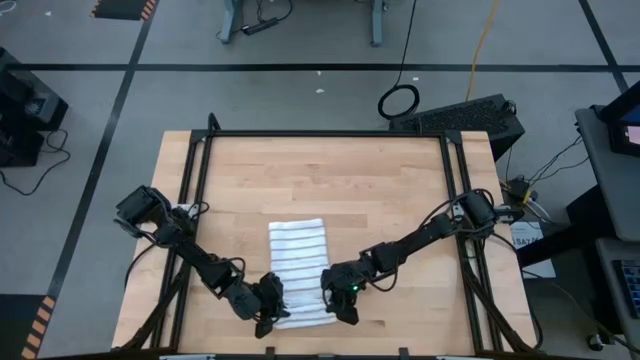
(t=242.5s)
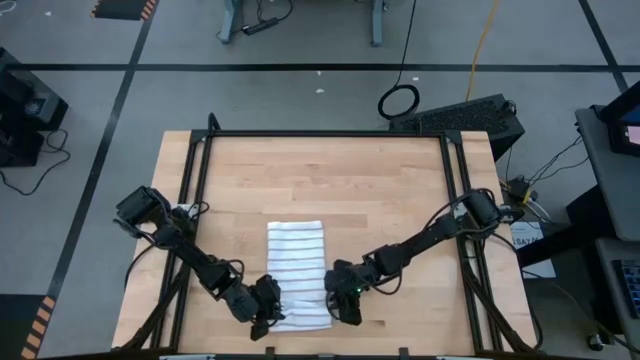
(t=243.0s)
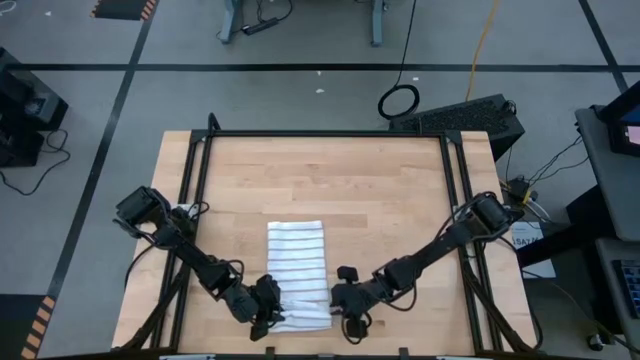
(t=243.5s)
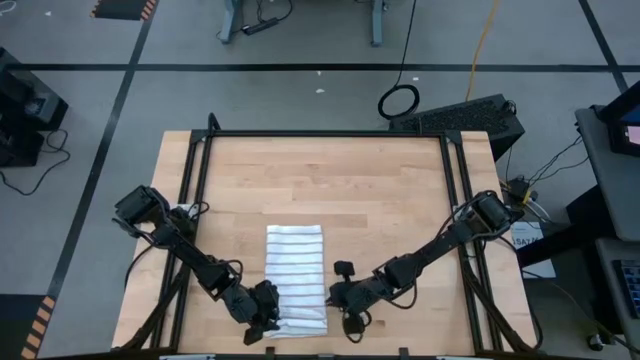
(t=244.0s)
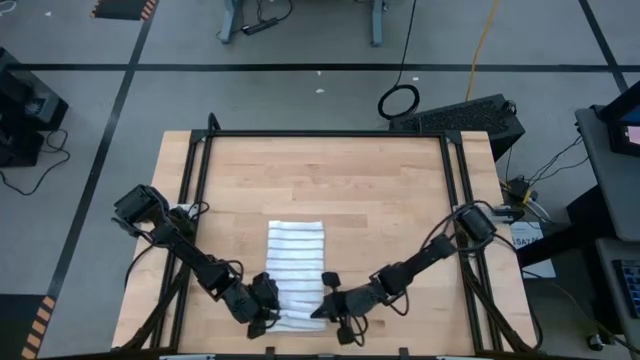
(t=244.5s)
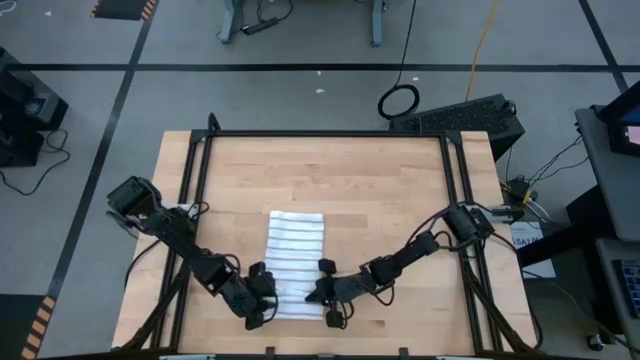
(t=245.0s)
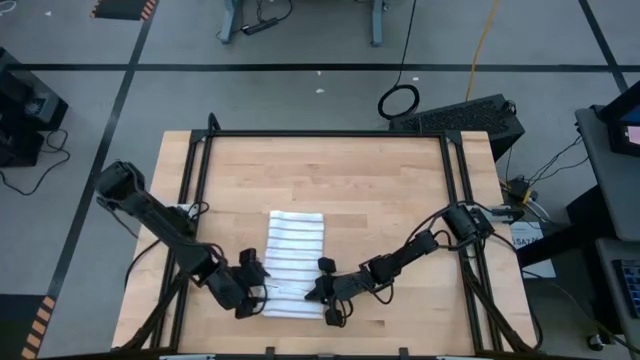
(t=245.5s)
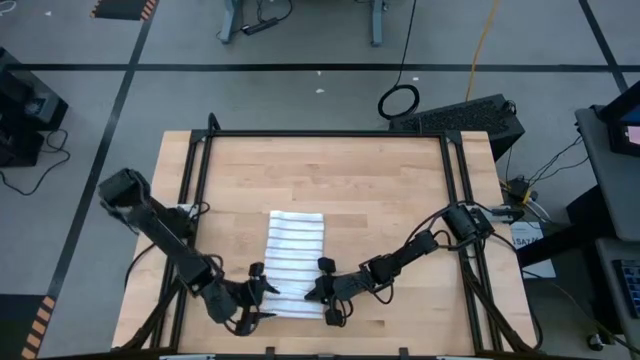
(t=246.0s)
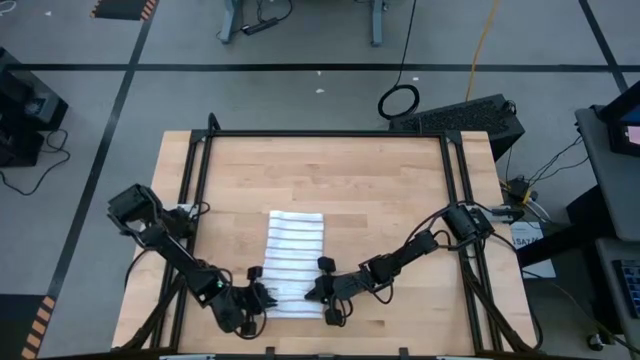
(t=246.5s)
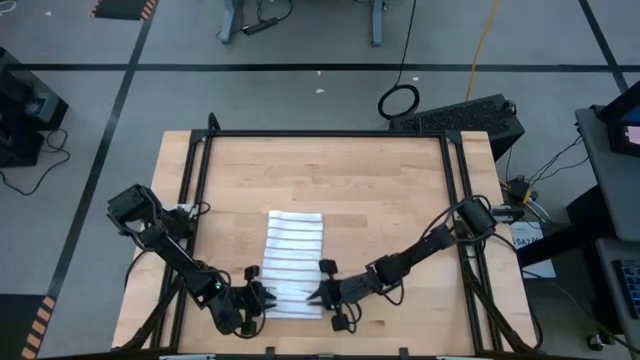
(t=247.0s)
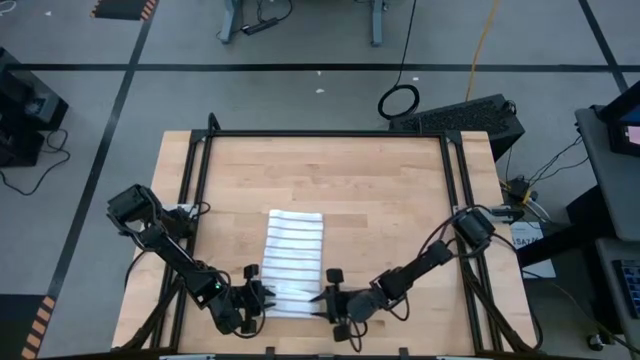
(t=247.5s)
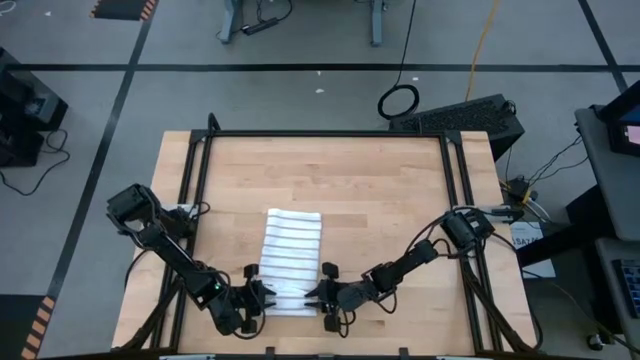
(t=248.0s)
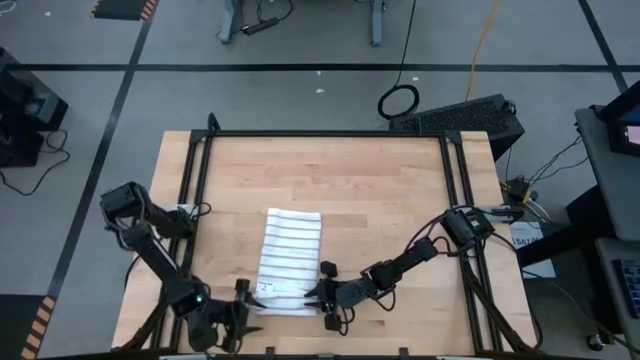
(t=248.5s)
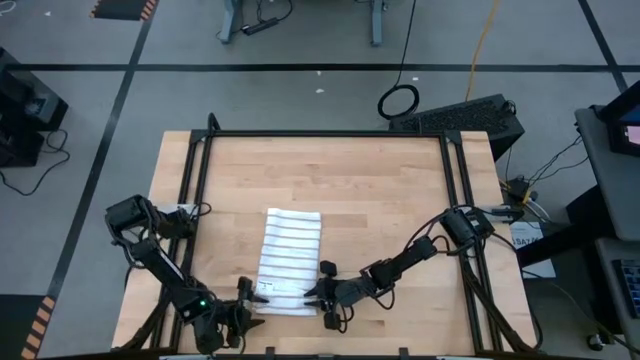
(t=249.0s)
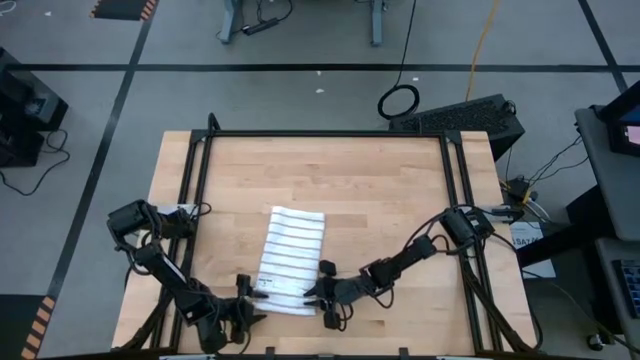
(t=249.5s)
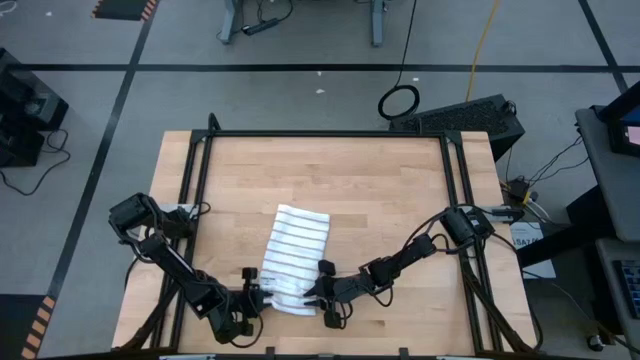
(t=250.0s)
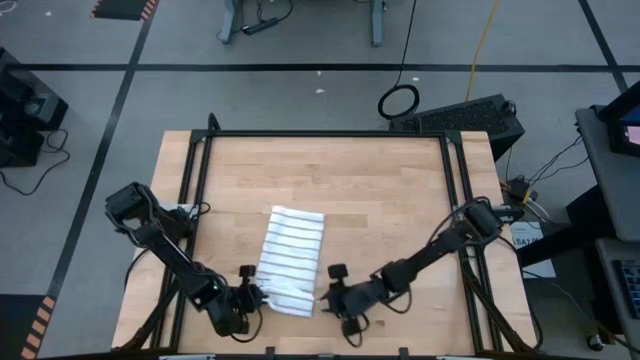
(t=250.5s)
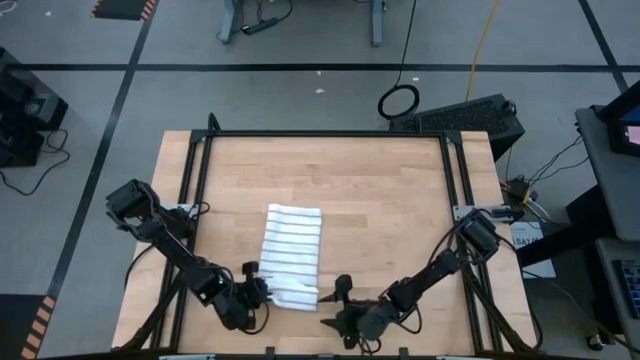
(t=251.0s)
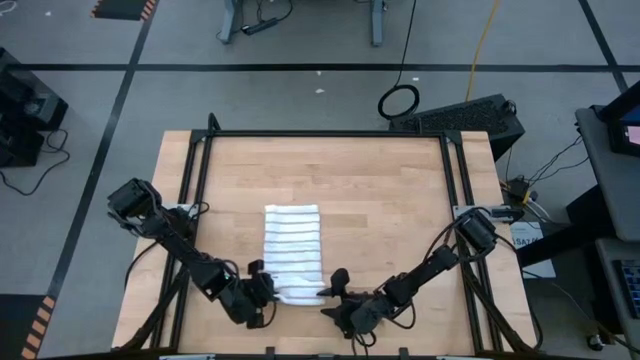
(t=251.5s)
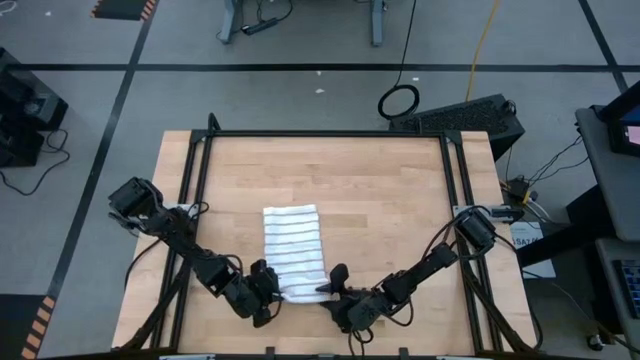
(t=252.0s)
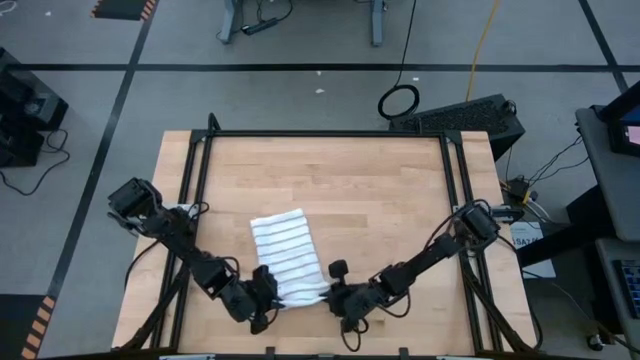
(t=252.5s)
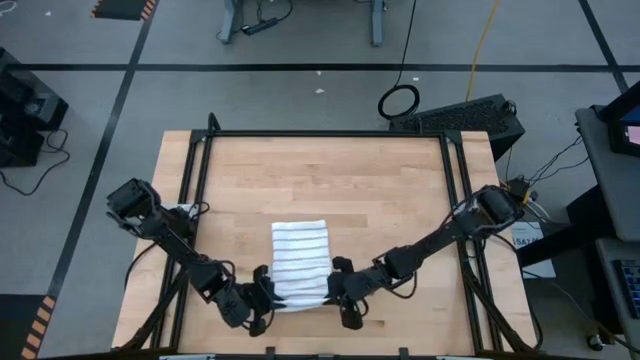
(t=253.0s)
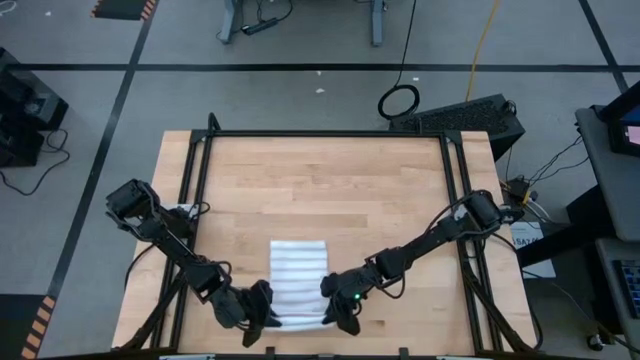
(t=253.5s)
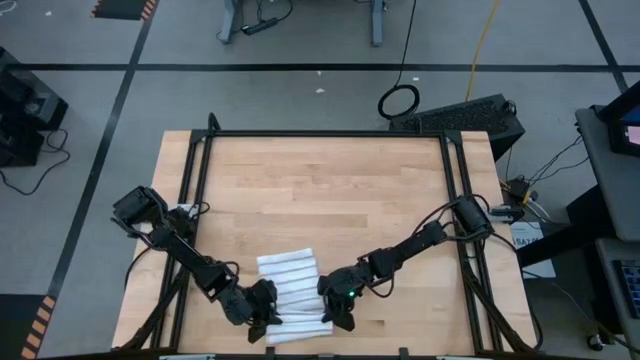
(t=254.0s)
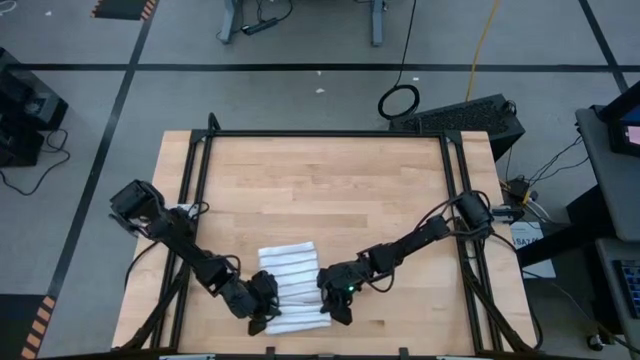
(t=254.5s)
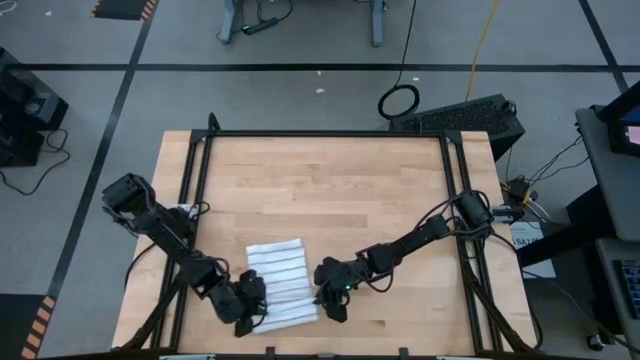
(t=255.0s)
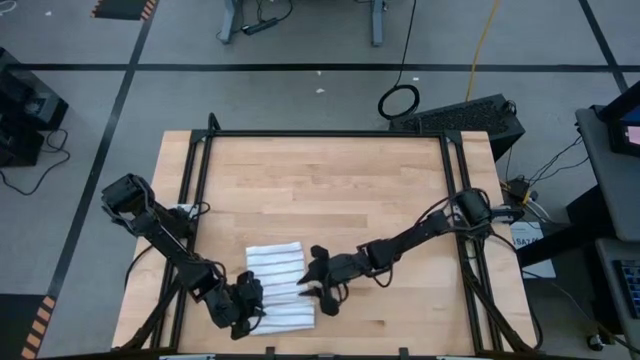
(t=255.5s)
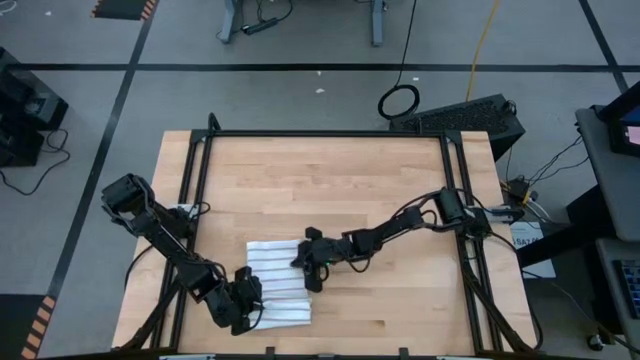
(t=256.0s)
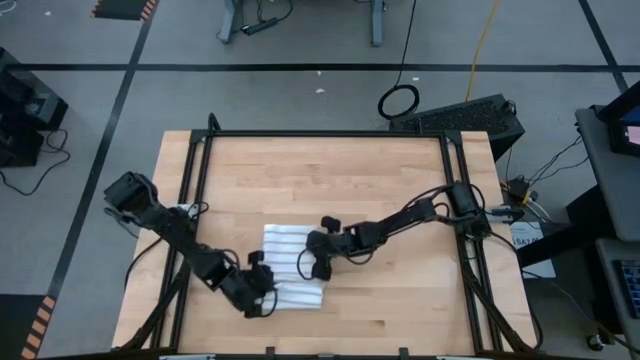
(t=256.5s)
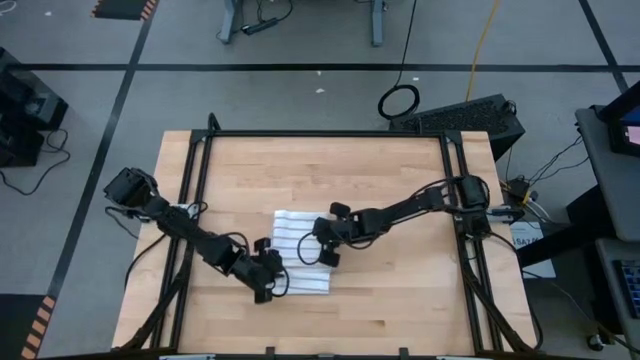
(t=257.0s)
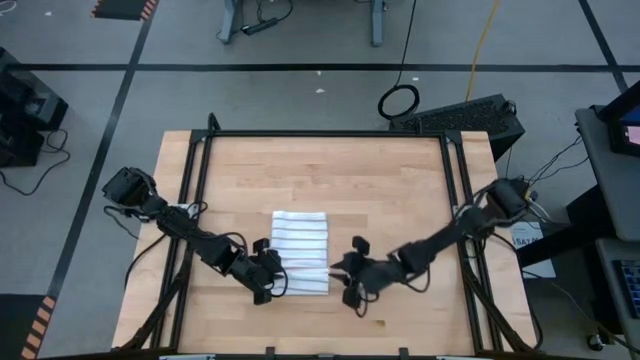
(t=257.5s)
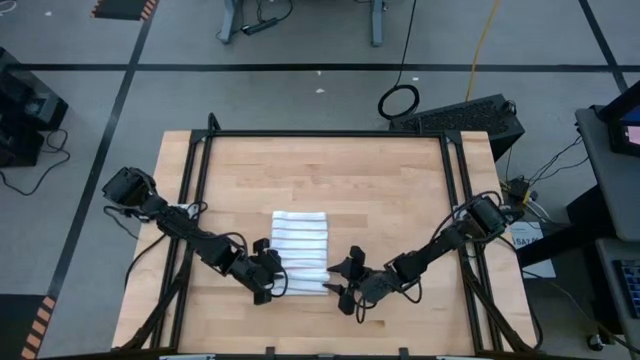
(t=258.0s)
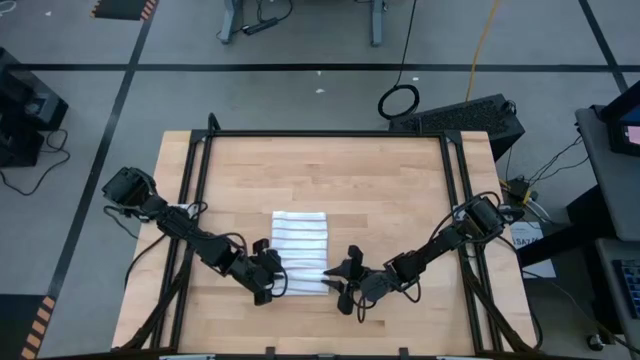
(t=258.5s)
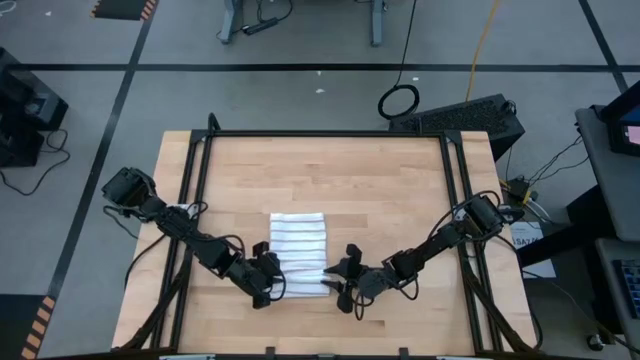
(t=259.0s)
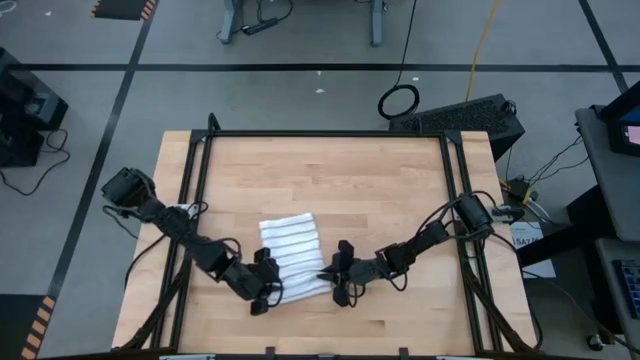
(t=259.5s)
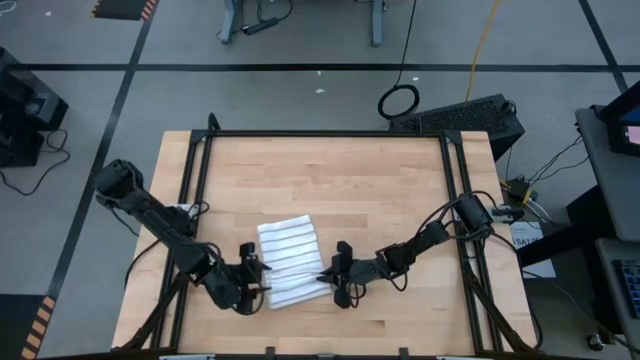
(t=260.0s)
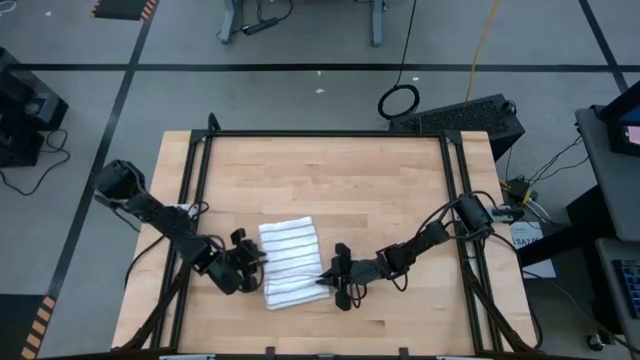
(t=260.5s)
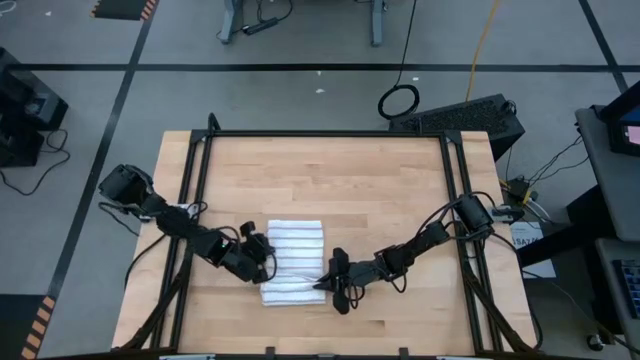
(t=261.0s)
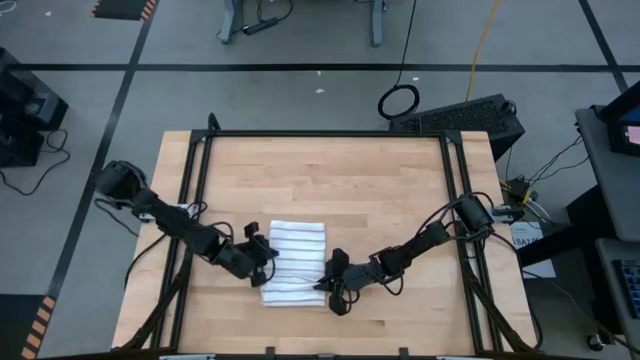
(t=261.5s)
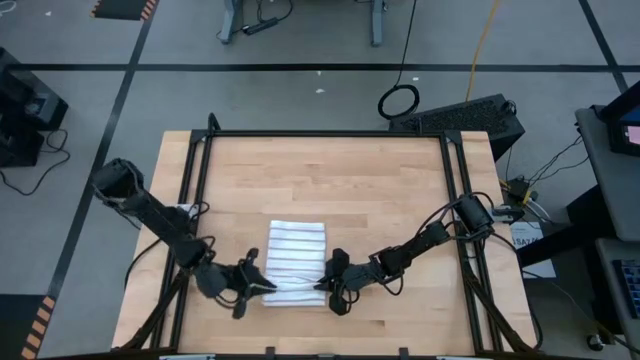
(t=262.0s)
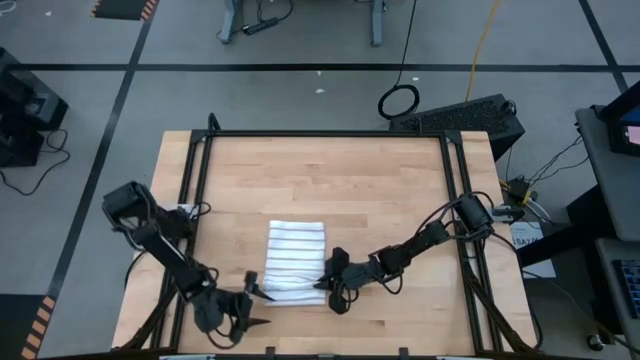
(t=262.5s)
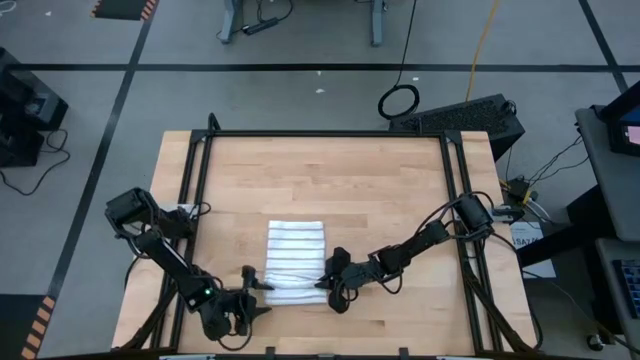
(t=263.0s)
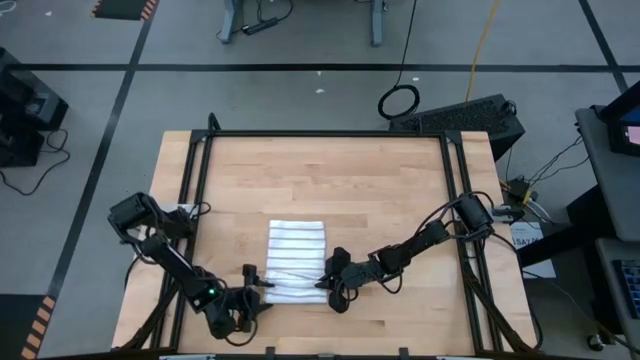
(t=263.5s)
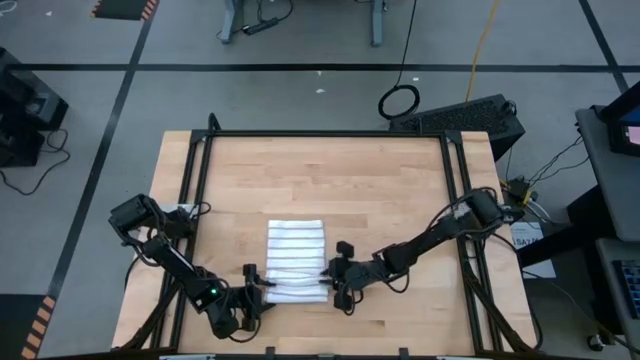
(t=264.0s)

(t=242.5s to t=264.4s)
Task: Roll towel
Roll the white towel
